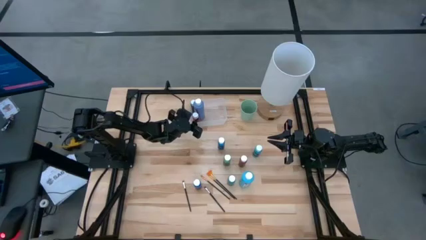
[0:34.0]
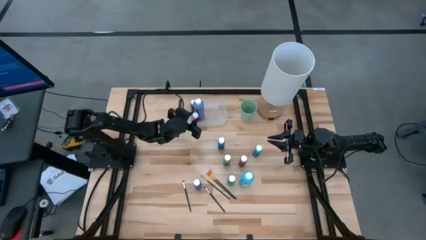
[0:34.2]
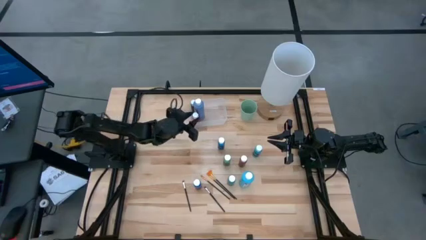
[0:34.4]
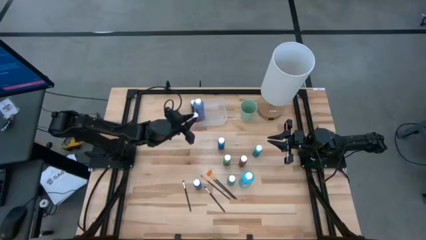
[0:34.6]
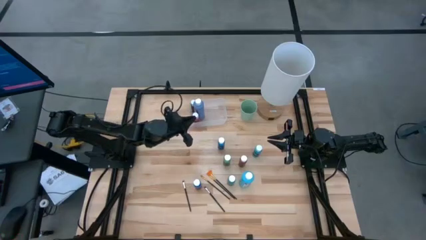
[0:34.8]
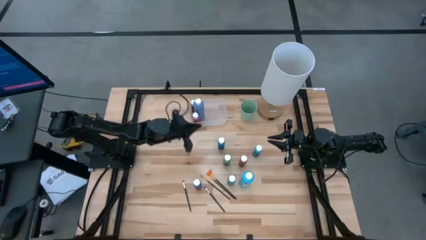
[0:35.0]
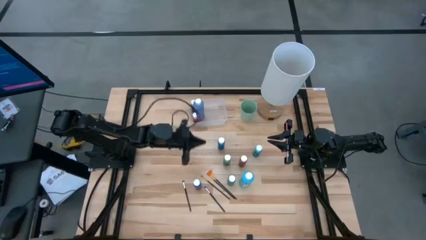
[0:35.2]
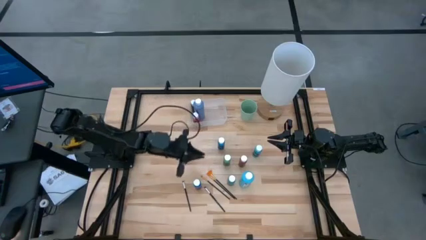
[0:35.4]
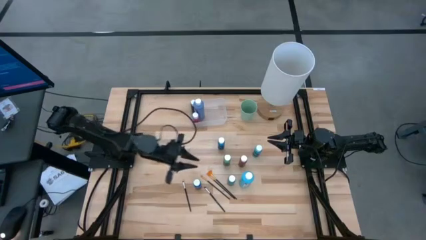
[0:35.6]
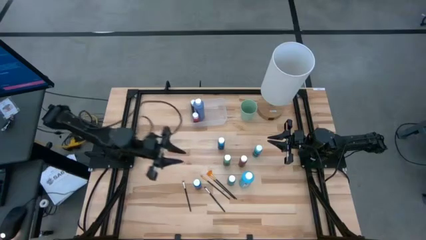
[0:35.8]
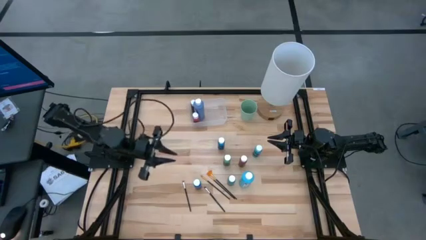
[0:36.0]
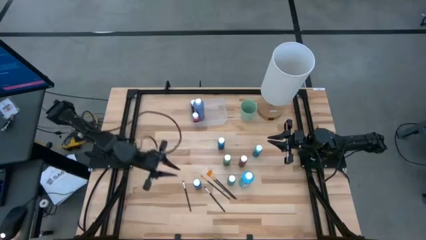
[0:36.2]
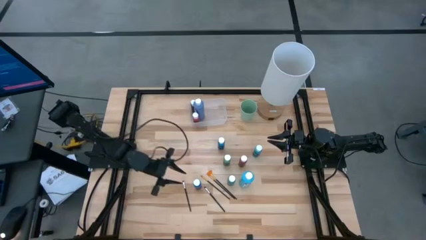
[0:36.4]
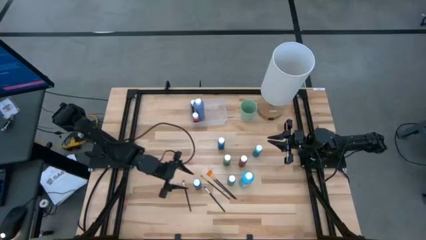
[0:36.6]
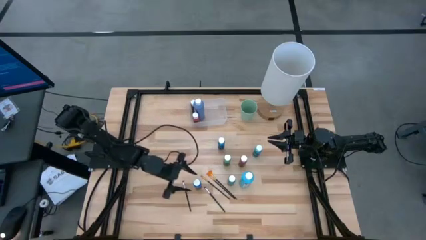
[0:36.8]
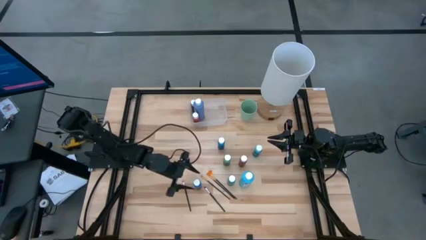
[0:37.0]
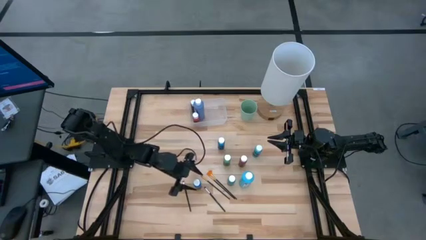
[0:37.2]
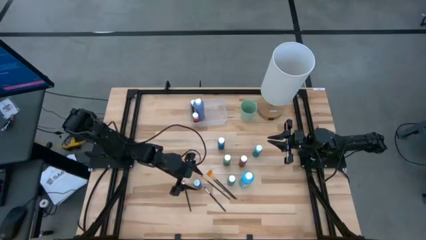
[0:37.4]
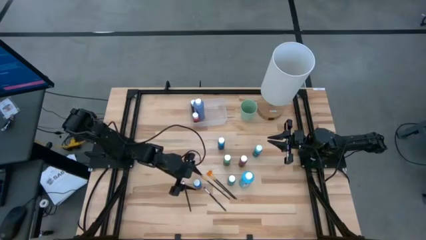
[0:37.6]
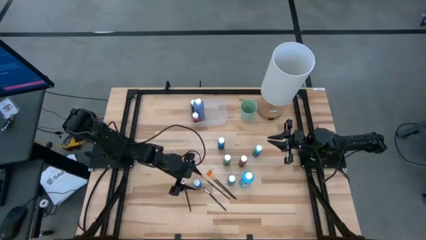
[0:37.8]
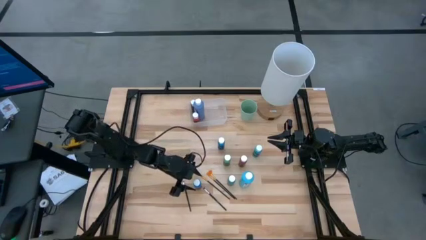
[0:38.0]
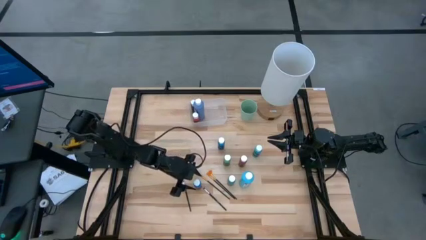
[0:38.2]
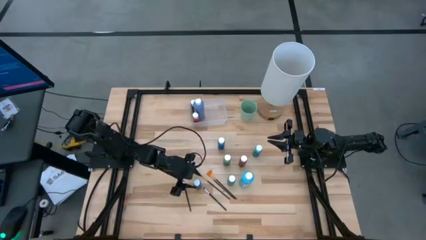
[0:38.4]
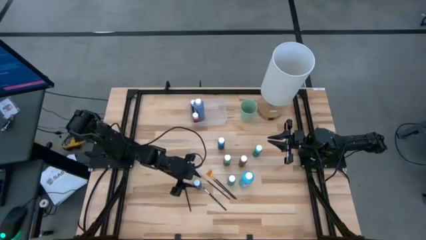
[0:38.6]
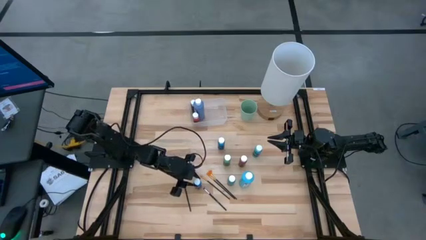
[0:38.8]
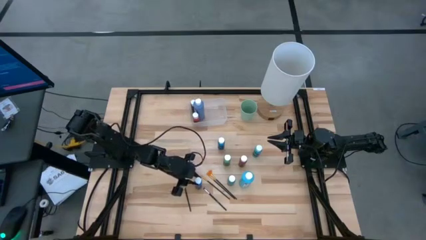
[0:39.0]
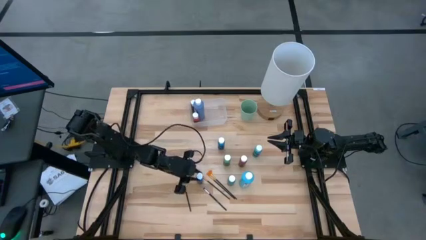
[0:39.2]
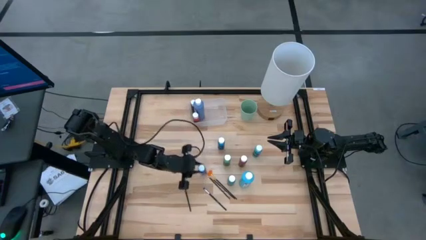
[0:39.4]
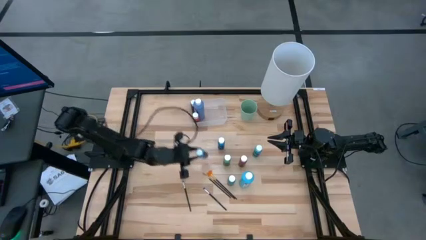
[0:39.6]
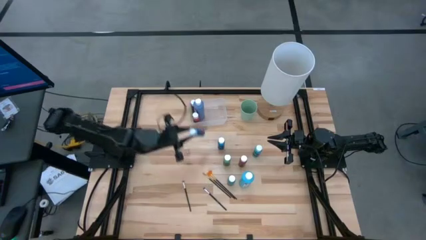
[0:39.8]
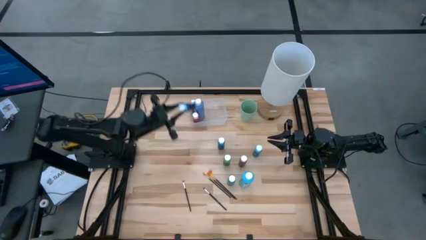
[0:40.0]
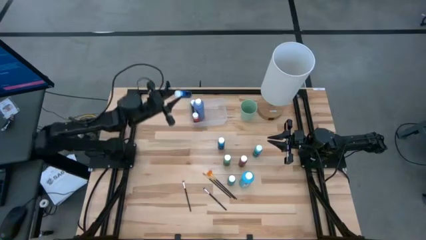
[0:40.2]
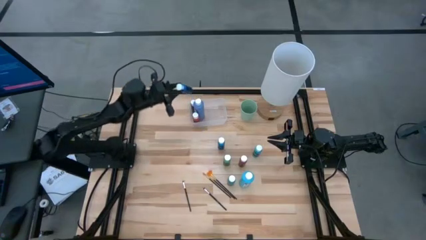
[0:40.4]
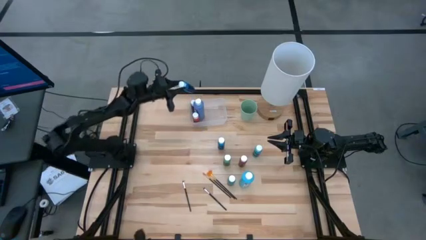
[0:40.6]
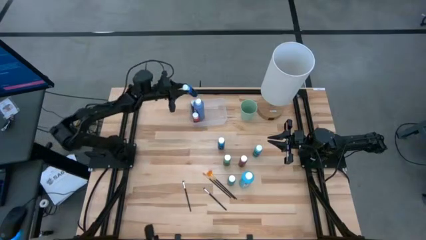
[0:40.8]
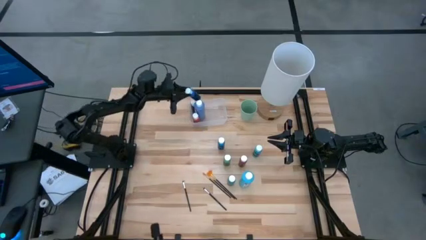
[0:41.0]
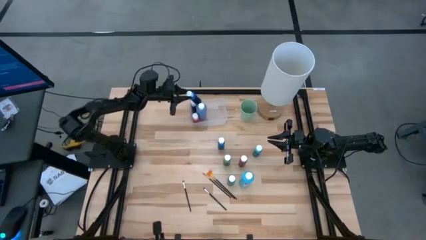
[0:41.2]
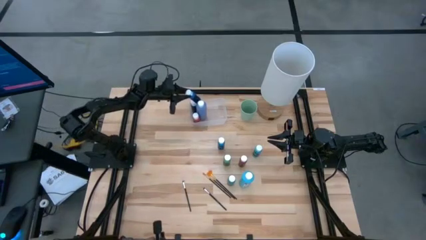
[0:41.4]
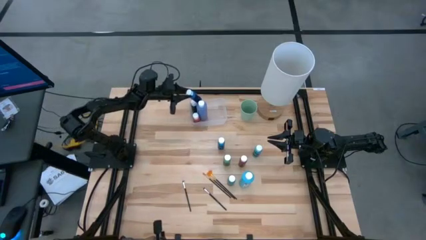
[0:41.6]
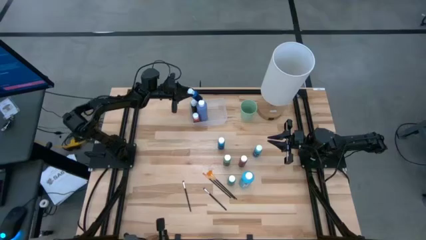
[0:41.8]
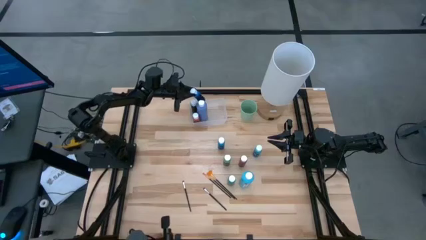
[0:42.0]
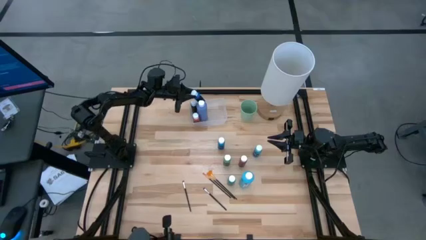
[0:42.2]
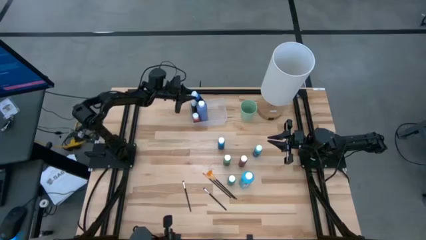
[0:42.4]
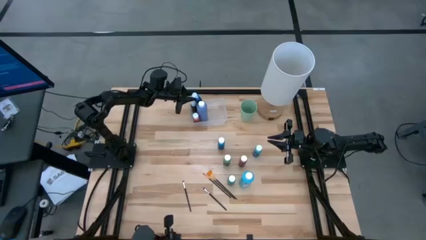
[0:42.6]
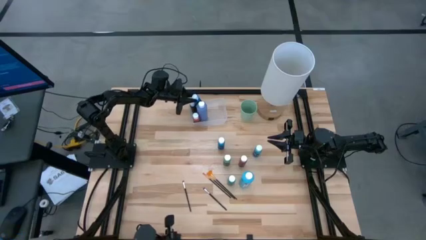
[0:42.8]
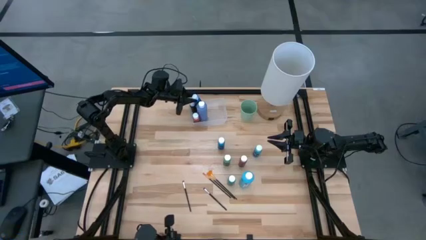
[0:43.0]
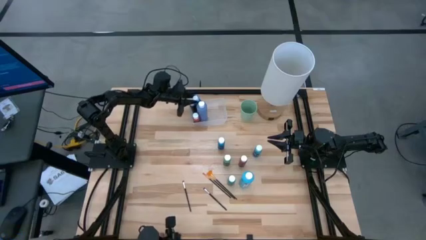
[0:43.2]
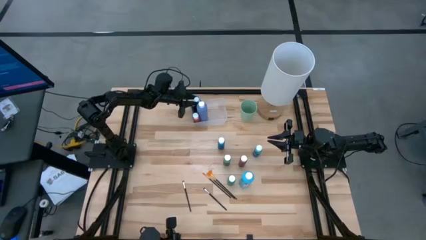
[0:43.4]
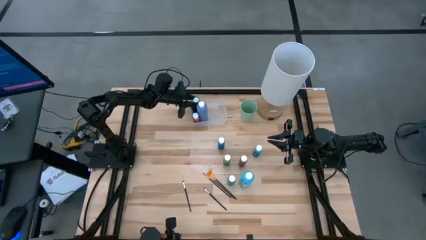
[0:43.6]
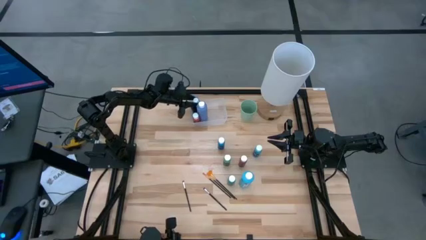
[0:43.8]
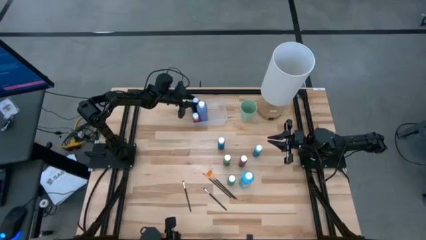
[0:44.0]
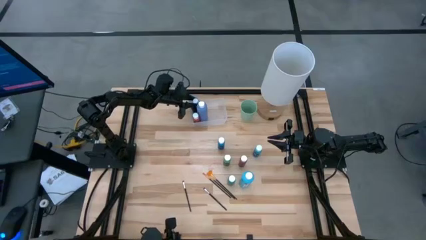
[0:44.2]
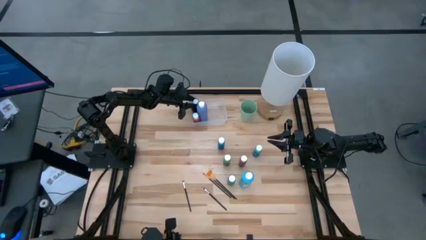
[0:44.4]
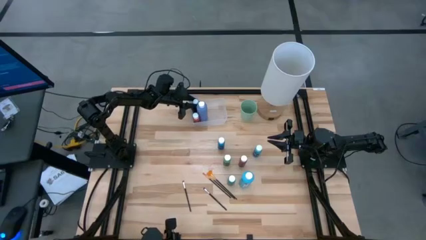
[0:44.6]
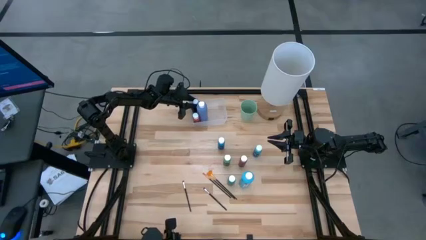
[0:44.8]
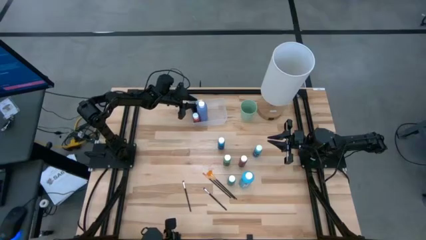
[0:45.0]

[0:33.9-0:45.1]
Task: Pick & Place Paint Supplies
Put the small bottom blue paint bottle into the transparent bin
